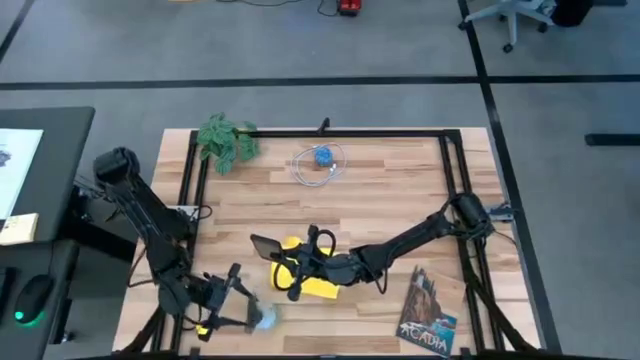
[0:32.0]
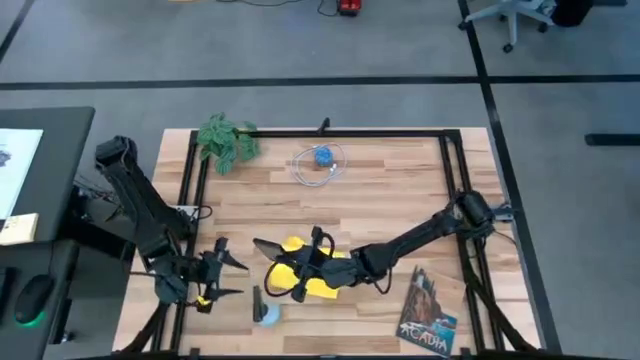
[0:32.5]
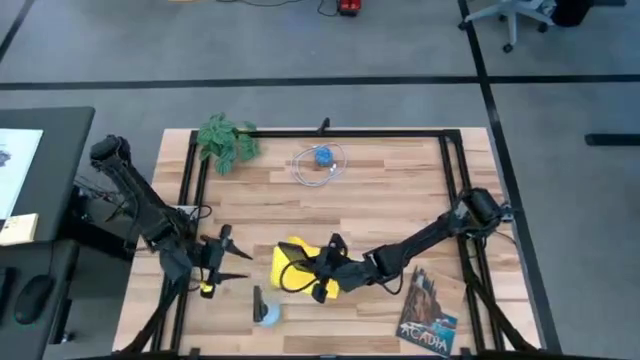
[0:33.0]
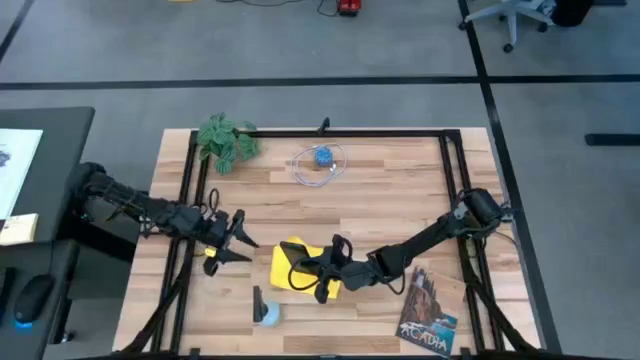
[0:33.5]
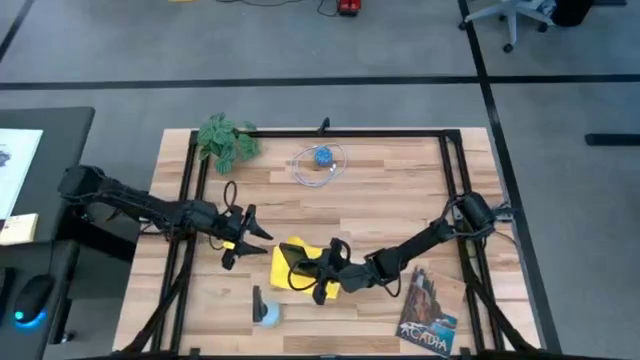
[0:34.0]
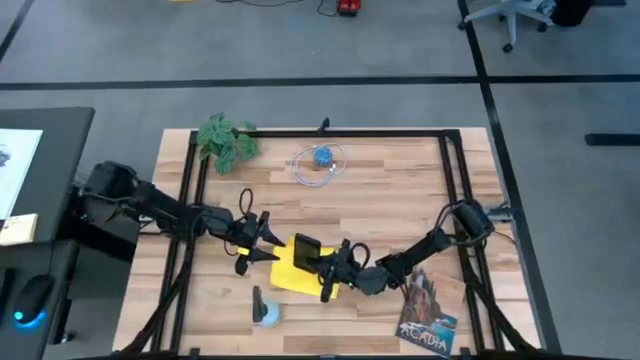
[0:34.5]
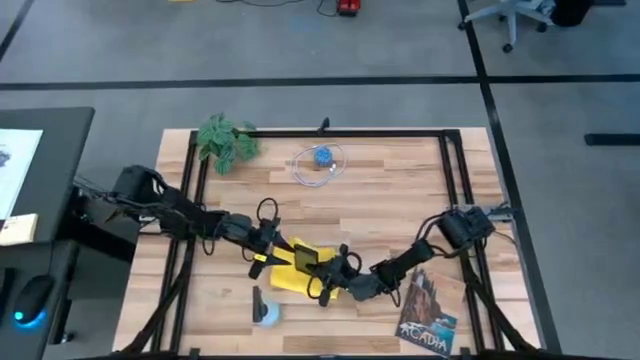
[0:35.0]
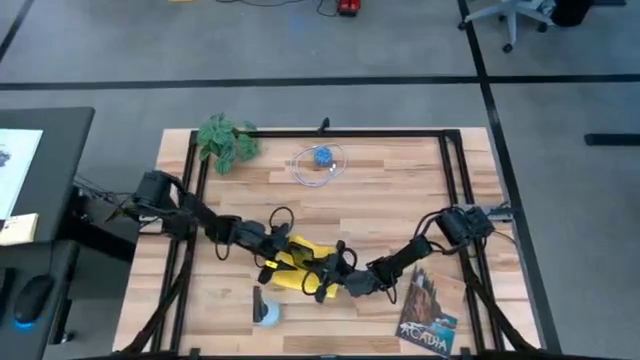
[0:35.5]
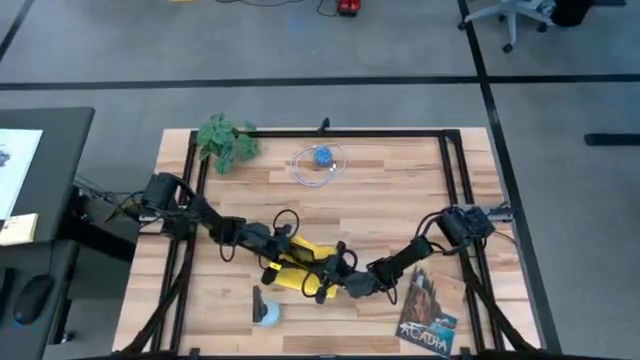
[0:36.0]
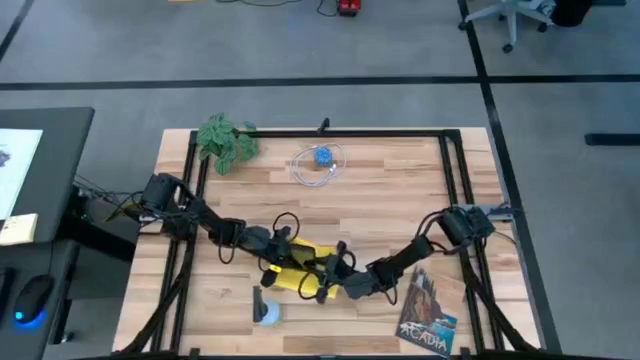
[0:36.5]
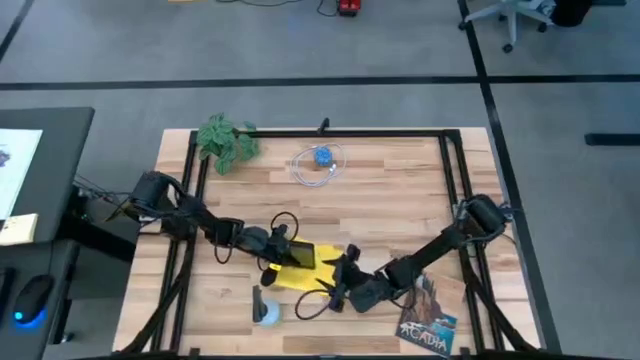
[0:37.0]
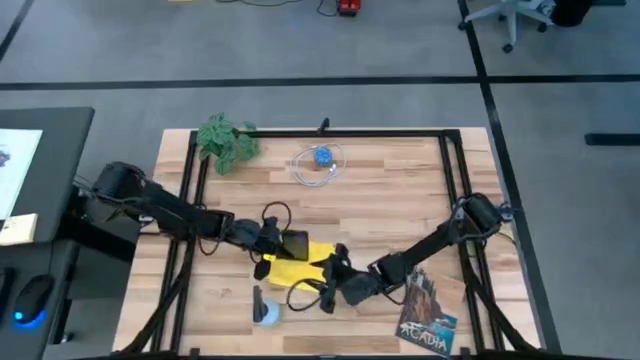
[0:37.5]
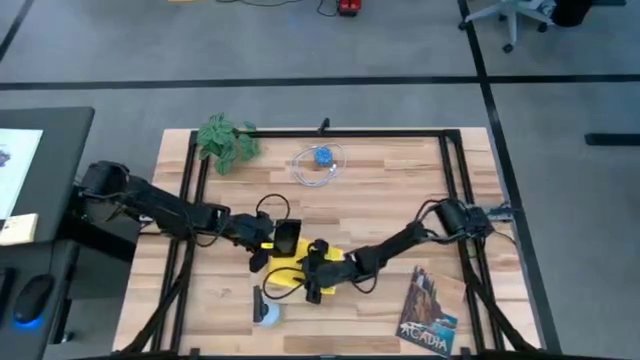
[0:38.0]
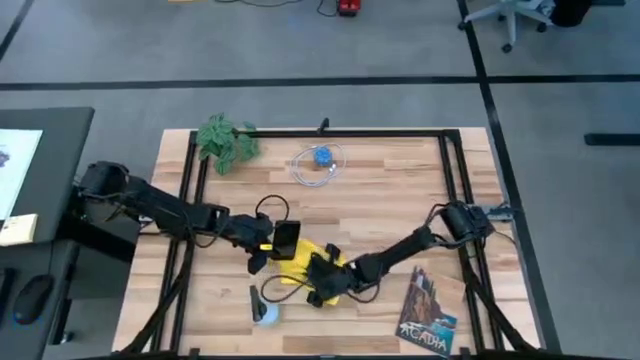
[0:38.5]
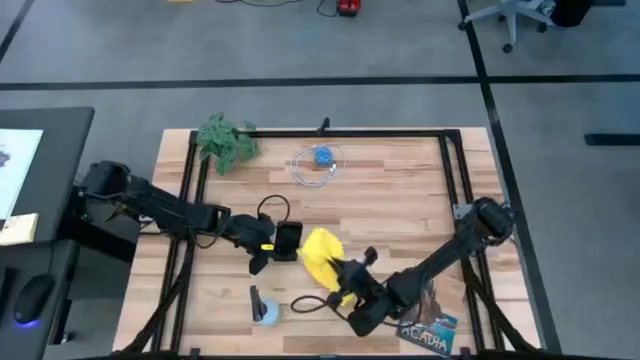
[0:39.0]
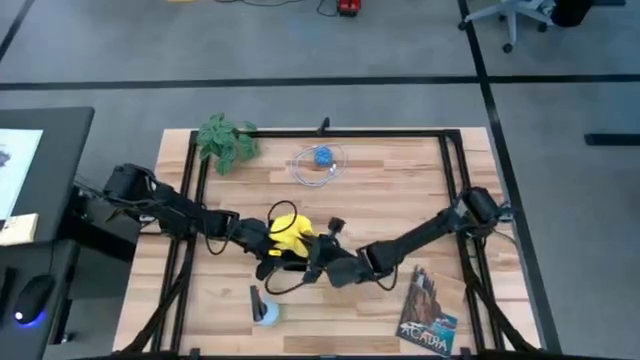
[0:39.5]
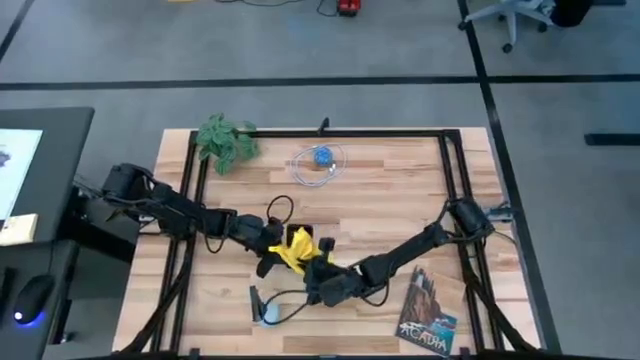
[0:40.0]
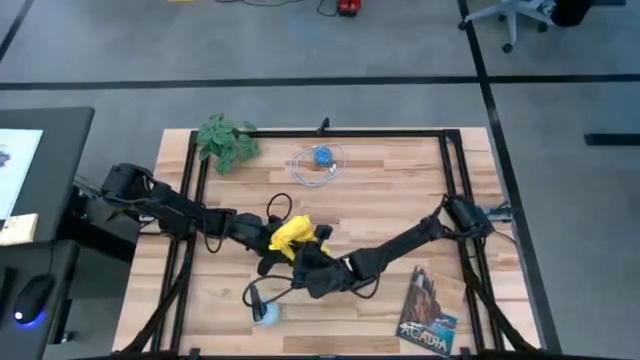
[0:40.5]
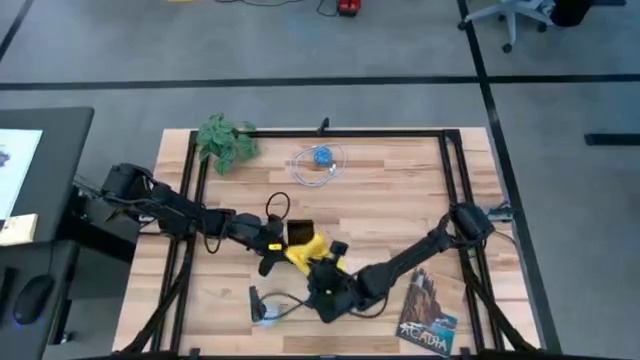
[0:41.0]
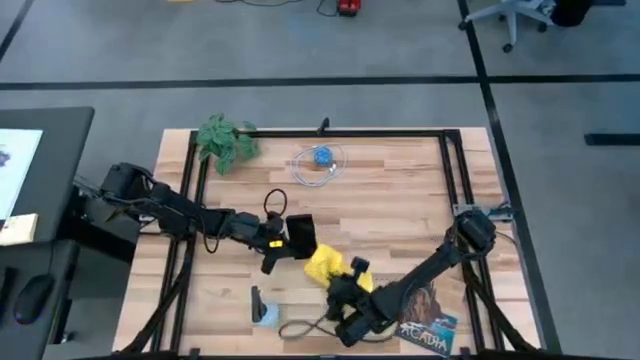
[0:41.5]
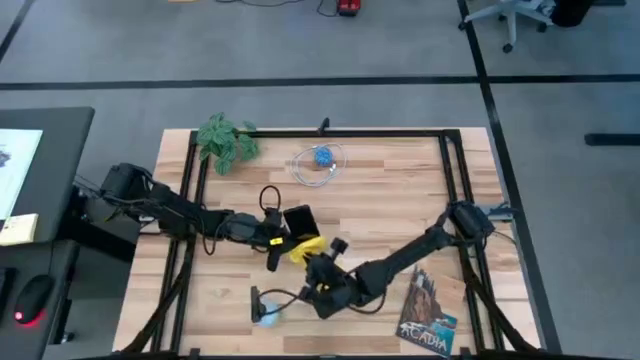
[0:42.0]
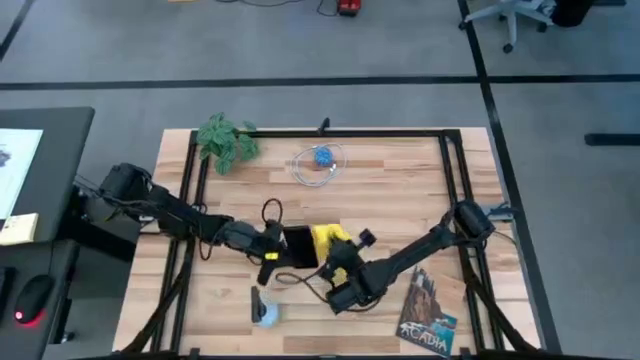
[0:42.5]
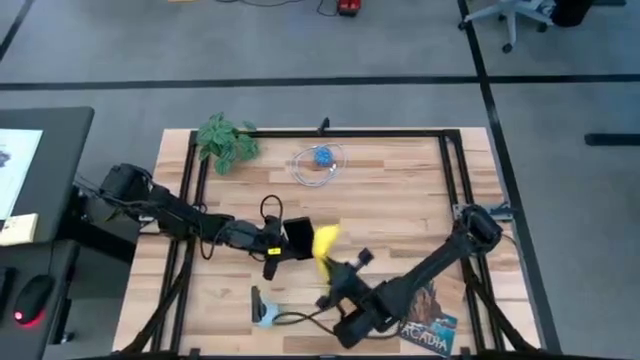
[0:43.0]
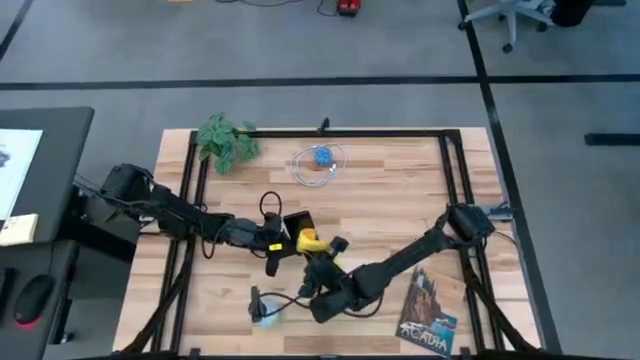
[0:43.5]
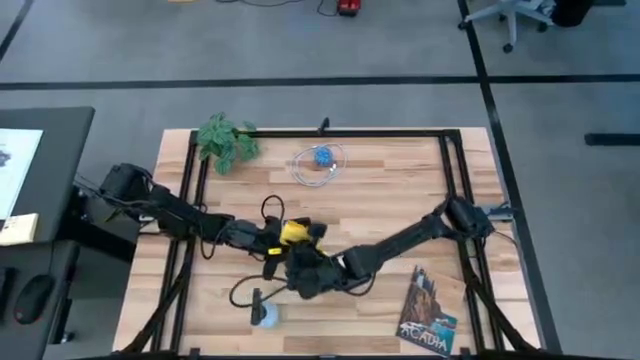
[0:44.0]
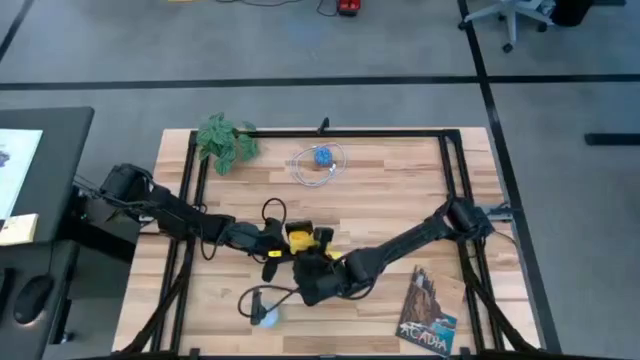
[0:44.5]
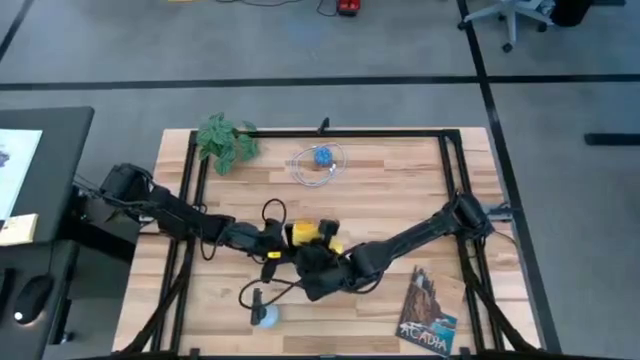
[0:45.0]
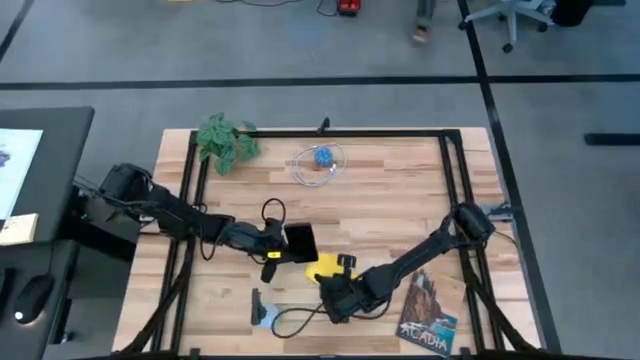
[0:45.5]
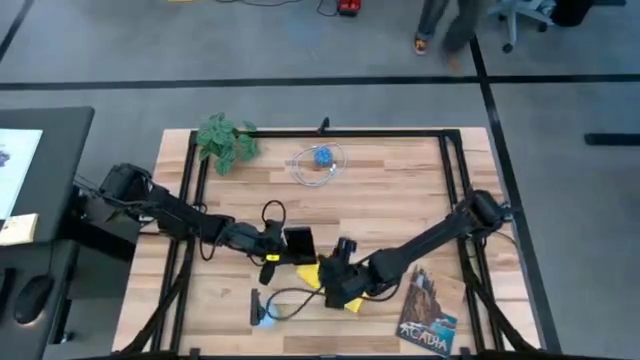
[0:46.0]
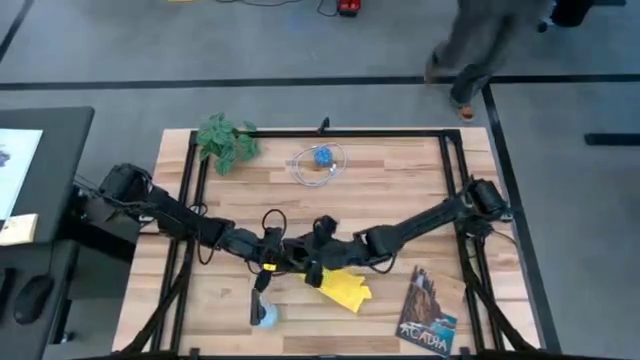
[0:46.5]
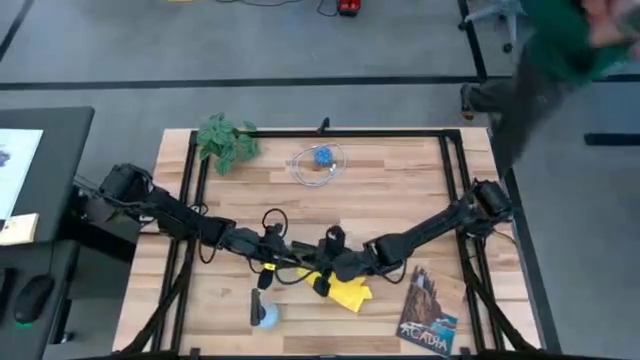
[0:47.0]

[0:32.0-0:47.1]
Task: Apply microfiber cloth
Wipe the cellphone using a microfiber cloth

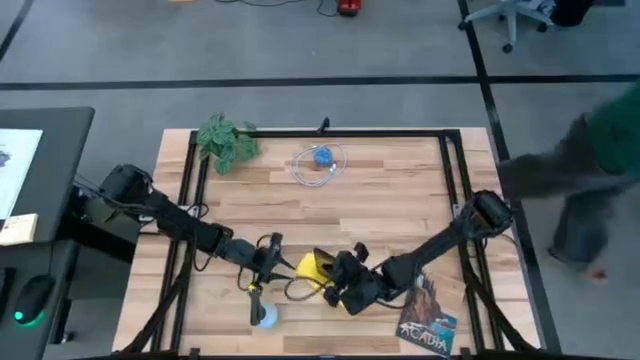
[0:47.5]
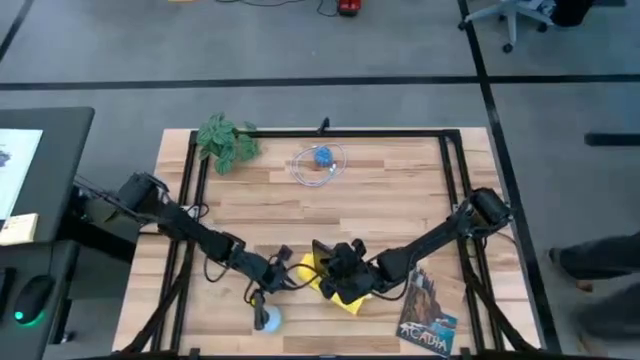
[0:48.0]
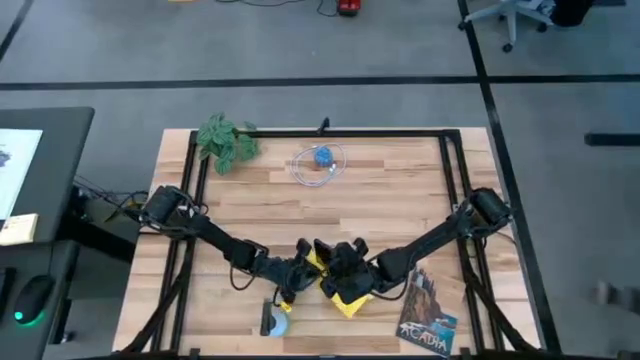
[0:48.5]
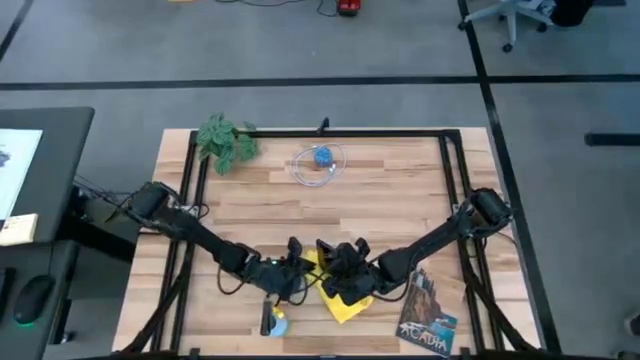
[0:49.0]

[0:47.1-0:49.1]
Wipe the cellphone using a microfiber cloth

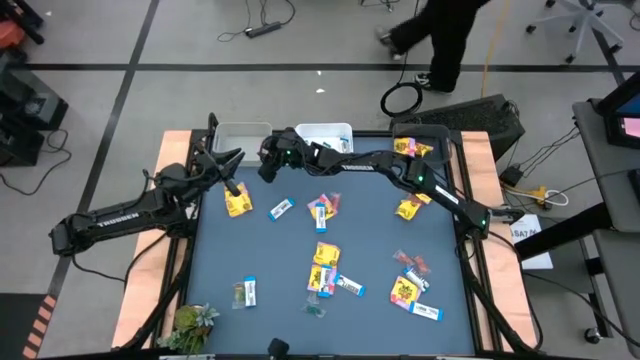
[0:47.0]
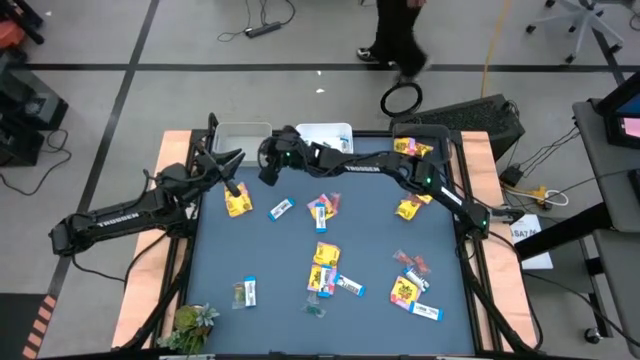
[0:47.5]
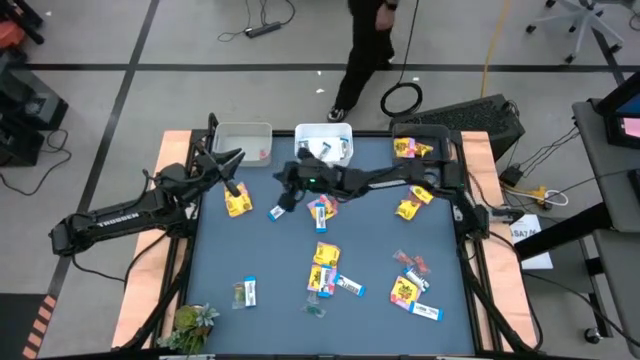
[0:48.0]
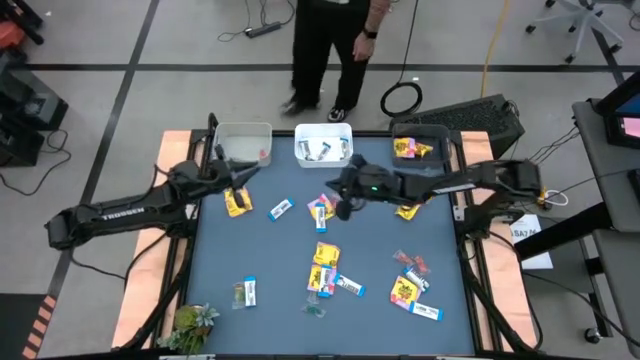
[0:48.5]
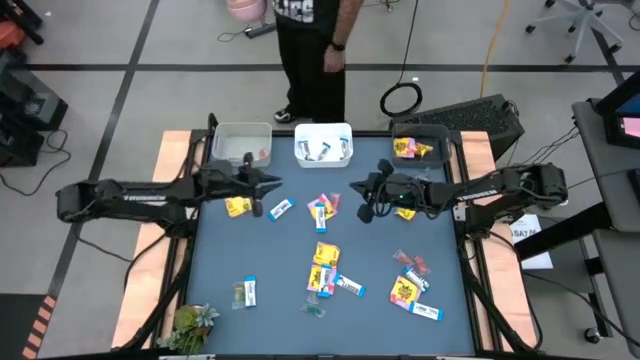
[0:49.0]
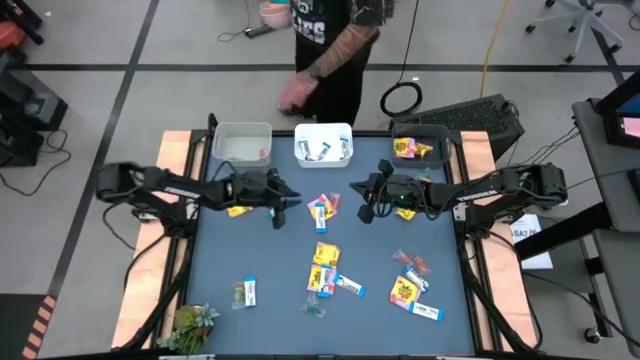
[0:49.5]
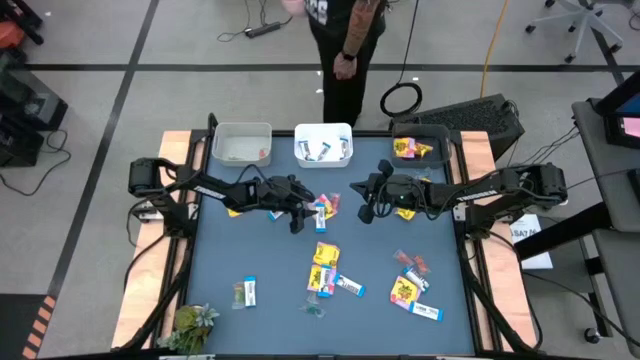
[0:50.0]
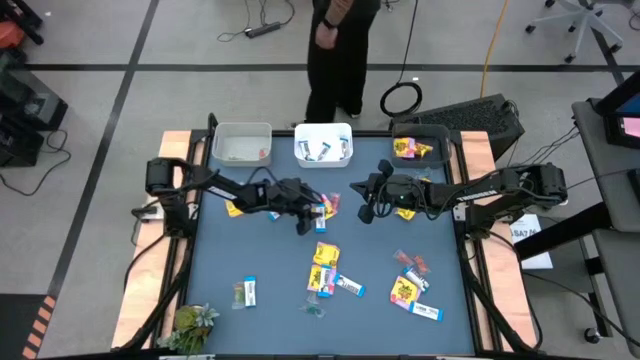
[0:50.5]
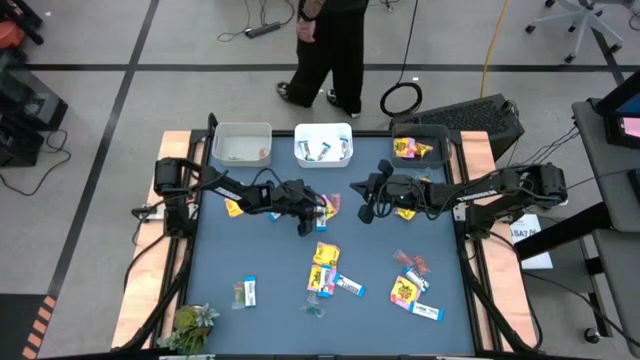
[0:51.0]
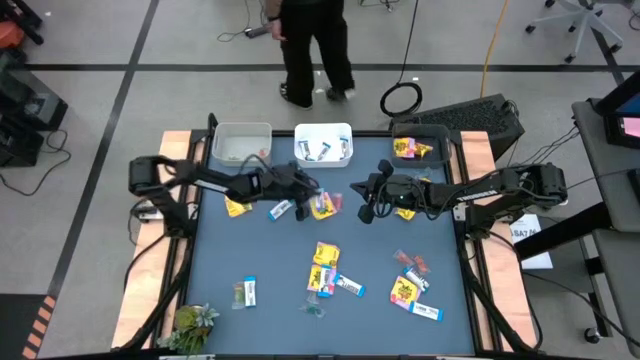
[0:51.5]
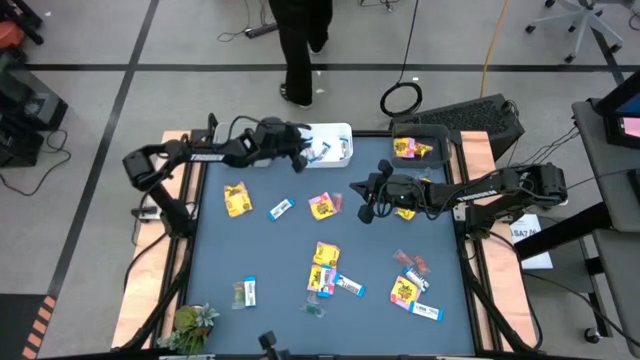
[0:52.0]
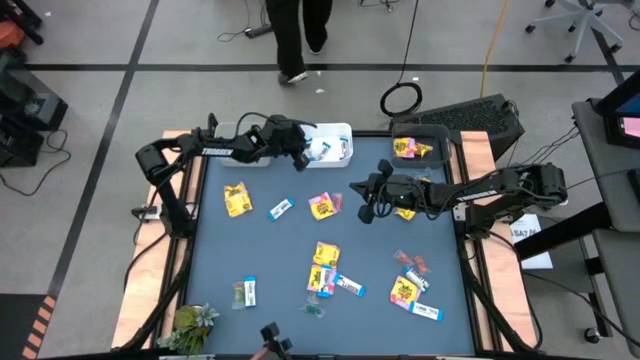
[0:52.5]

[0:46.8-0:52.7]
Task: Sort candy
Put the white chocolate into the white bin
